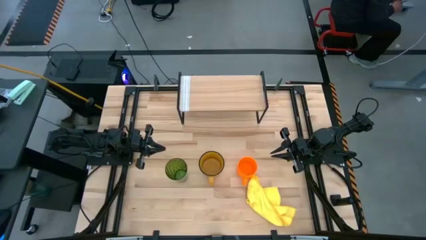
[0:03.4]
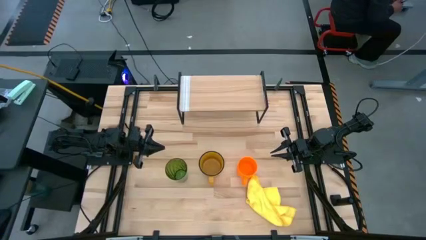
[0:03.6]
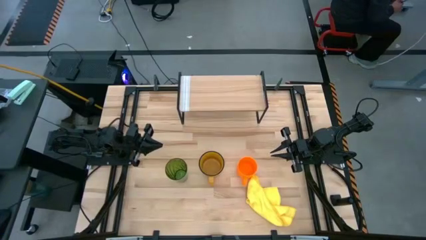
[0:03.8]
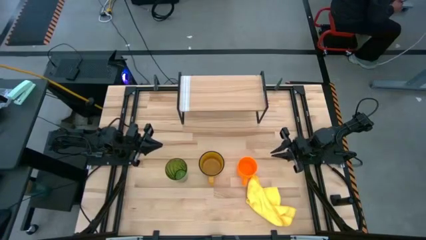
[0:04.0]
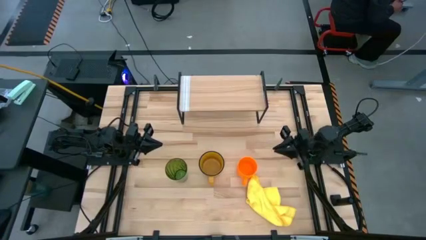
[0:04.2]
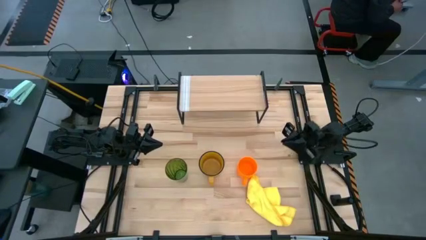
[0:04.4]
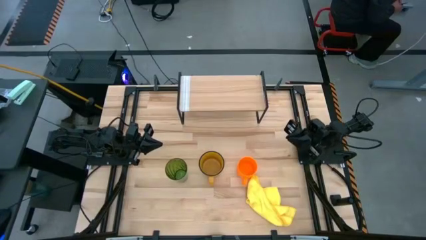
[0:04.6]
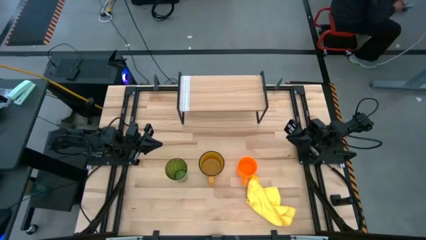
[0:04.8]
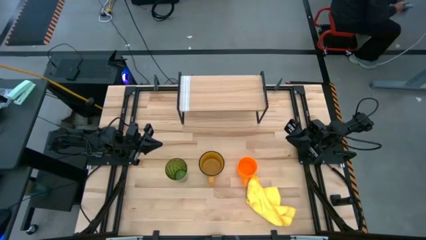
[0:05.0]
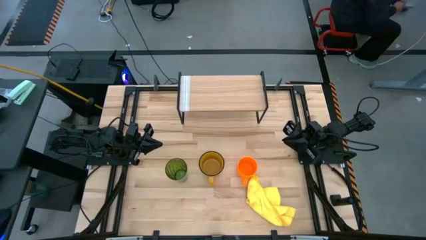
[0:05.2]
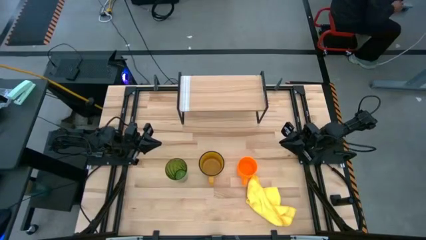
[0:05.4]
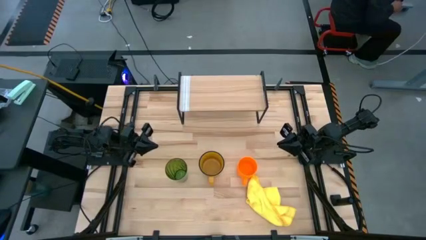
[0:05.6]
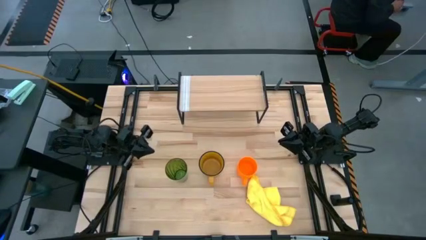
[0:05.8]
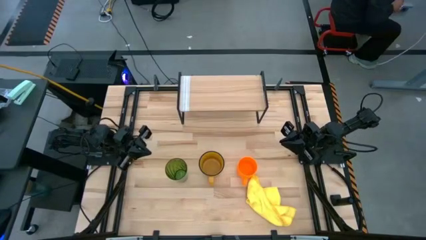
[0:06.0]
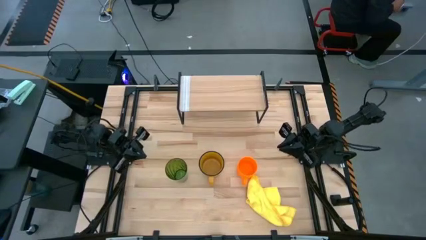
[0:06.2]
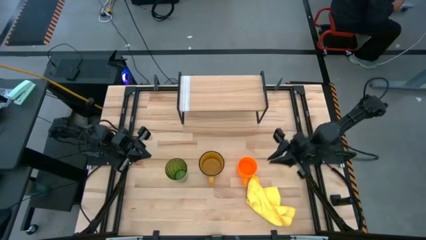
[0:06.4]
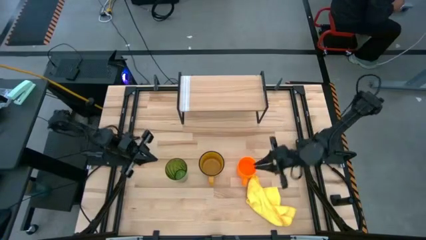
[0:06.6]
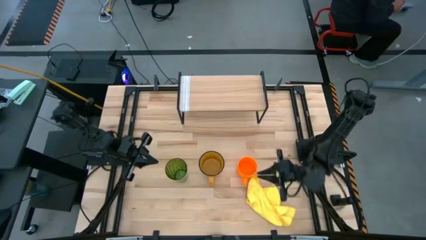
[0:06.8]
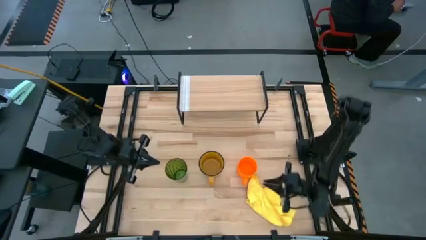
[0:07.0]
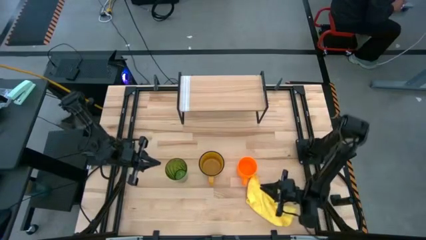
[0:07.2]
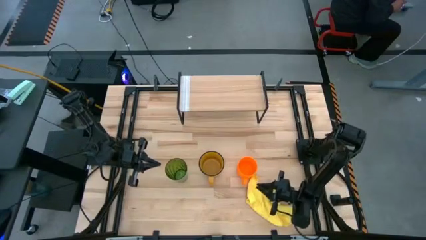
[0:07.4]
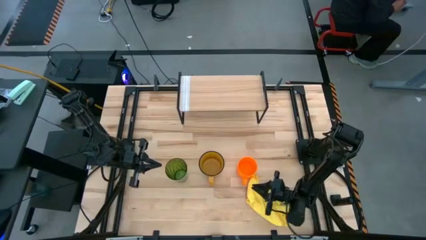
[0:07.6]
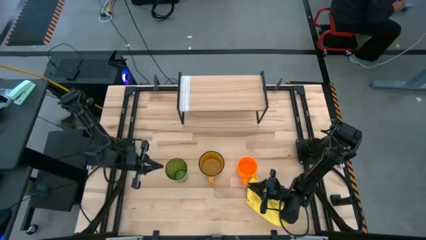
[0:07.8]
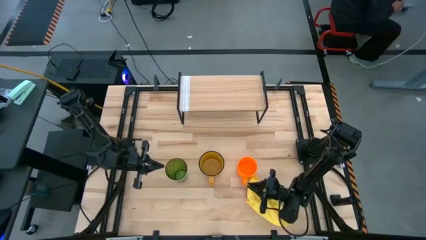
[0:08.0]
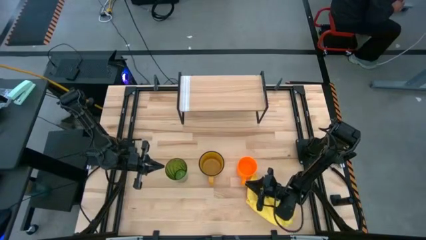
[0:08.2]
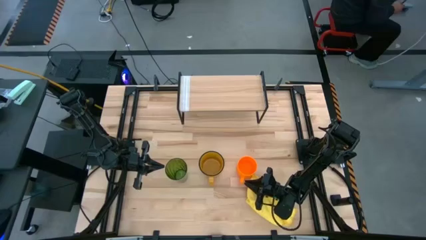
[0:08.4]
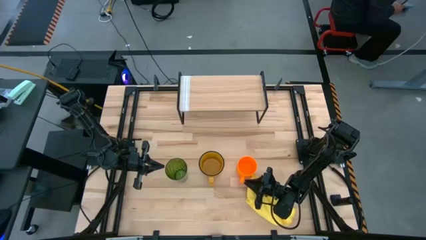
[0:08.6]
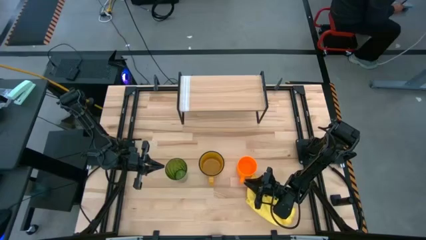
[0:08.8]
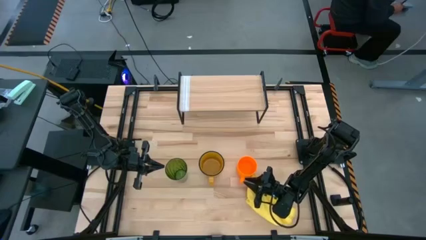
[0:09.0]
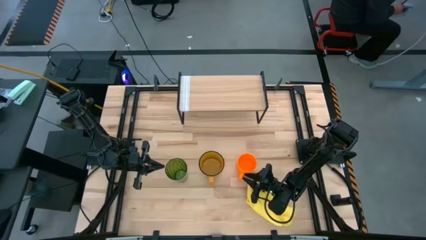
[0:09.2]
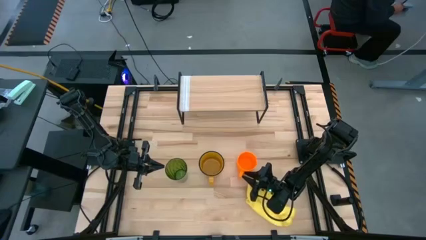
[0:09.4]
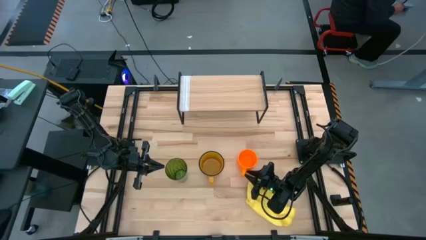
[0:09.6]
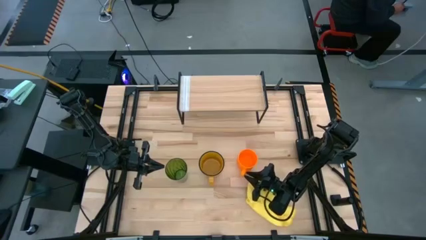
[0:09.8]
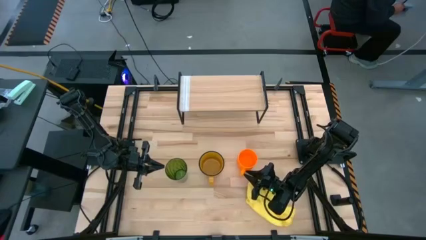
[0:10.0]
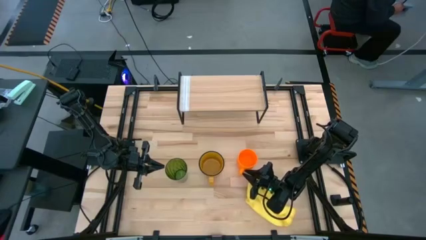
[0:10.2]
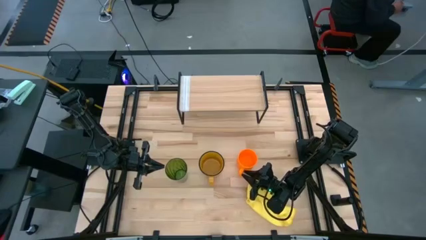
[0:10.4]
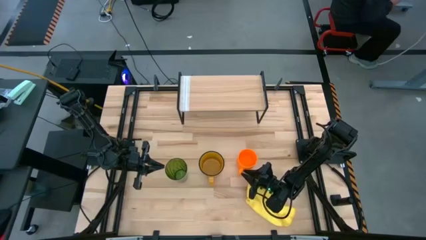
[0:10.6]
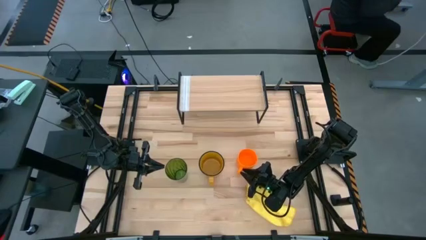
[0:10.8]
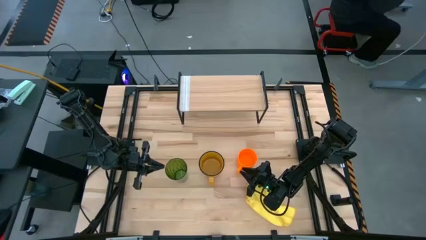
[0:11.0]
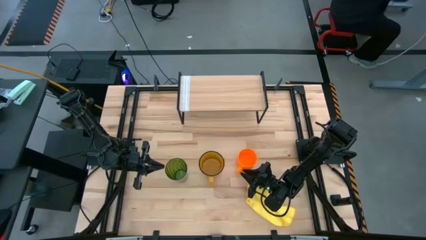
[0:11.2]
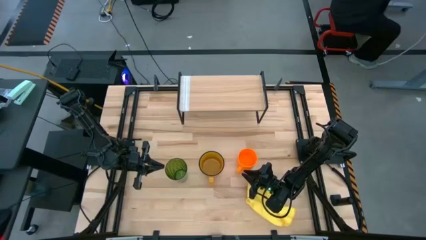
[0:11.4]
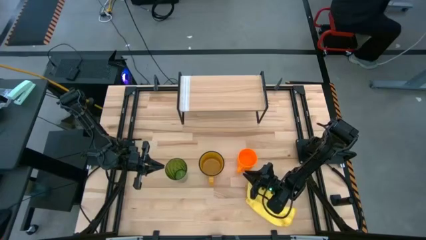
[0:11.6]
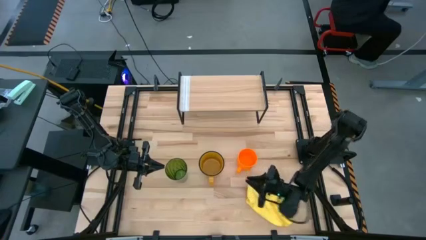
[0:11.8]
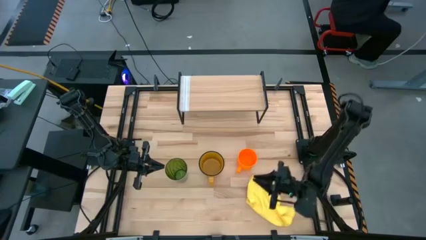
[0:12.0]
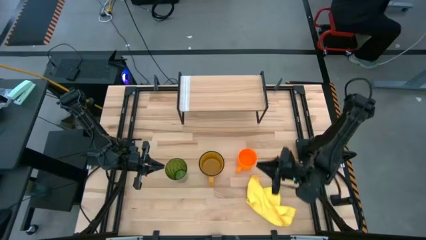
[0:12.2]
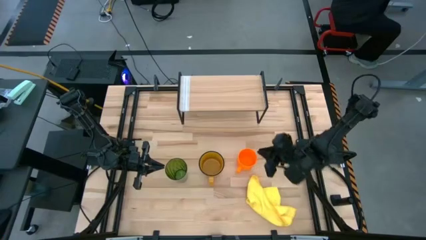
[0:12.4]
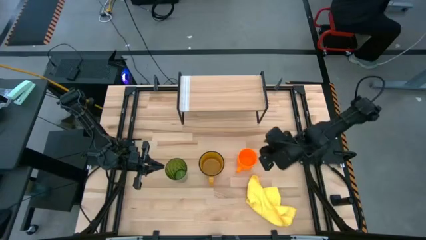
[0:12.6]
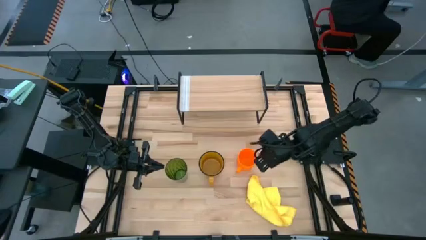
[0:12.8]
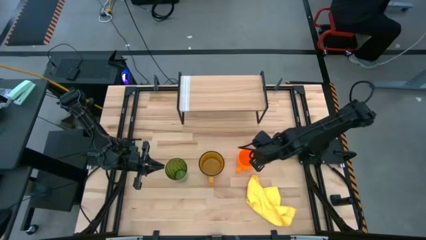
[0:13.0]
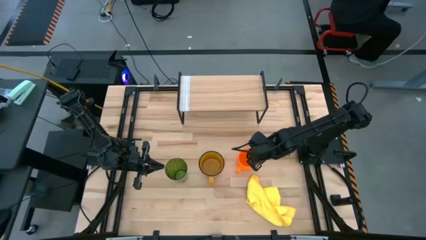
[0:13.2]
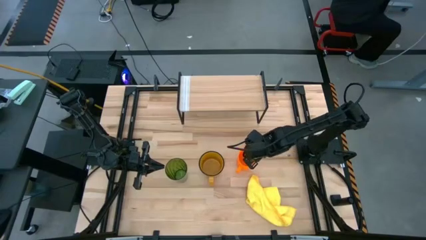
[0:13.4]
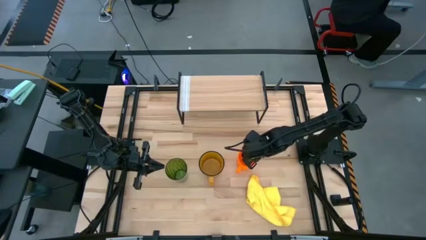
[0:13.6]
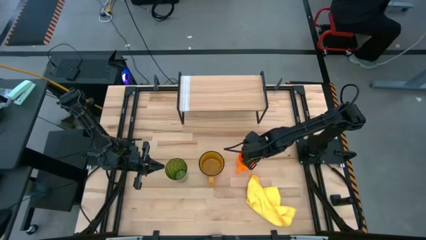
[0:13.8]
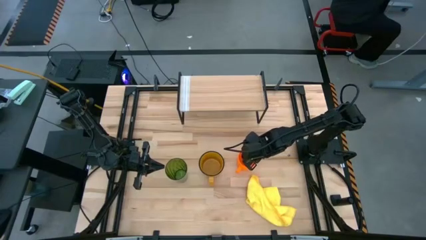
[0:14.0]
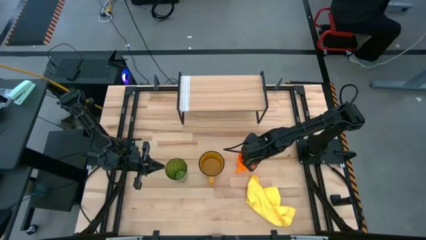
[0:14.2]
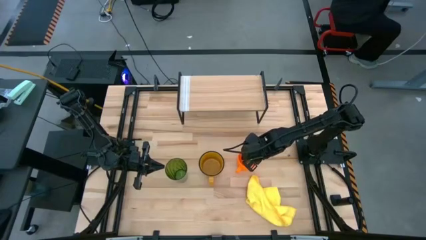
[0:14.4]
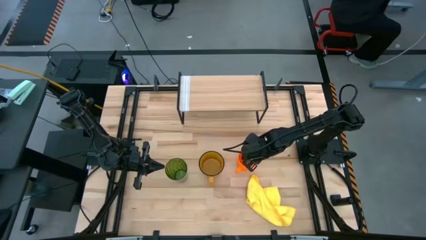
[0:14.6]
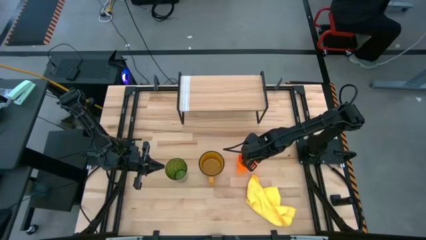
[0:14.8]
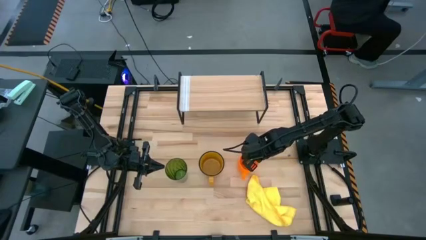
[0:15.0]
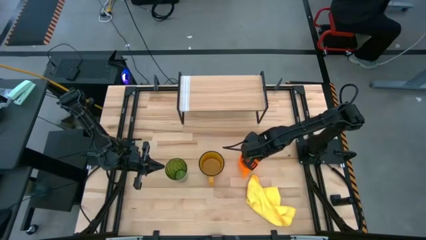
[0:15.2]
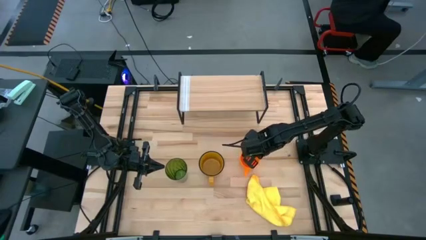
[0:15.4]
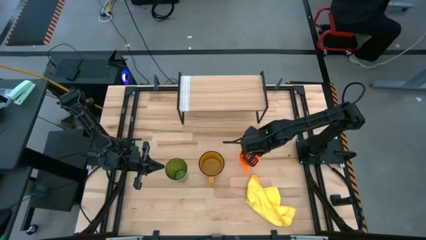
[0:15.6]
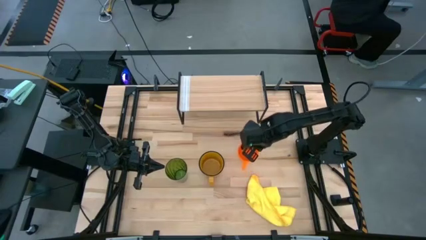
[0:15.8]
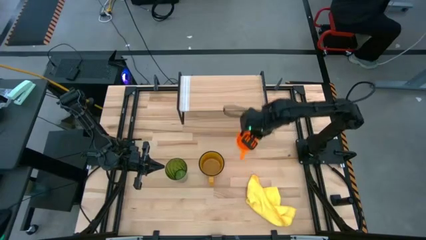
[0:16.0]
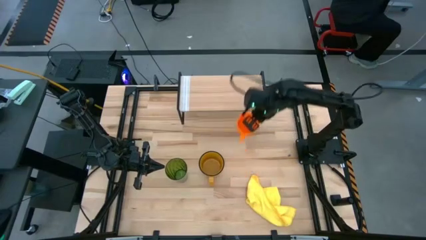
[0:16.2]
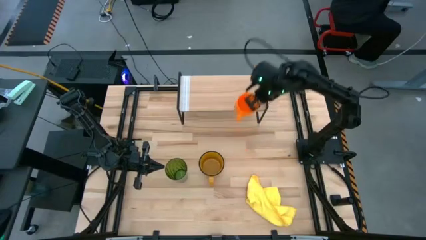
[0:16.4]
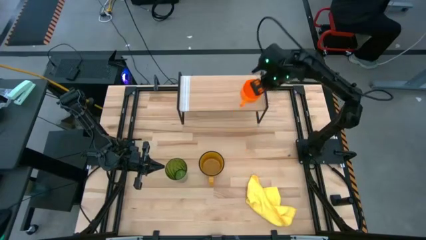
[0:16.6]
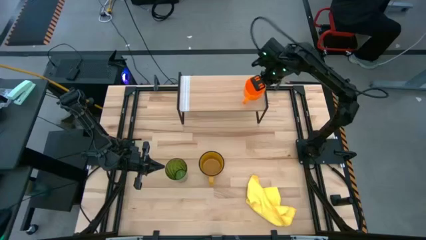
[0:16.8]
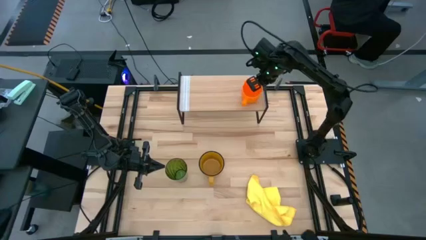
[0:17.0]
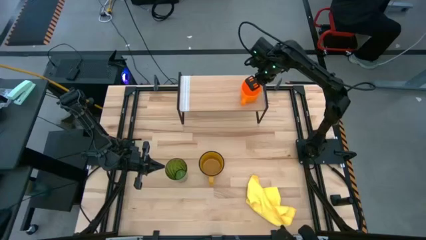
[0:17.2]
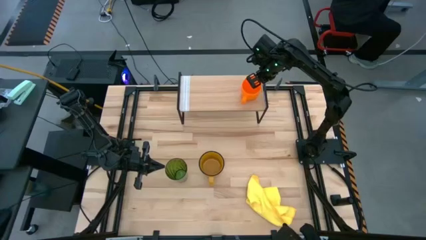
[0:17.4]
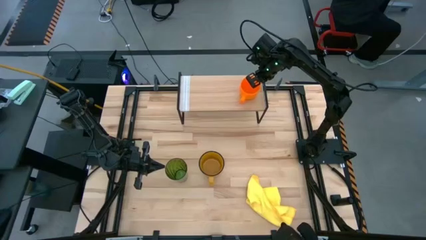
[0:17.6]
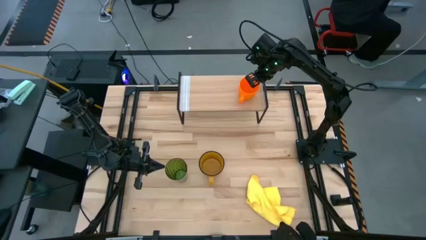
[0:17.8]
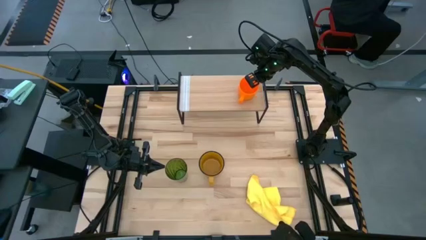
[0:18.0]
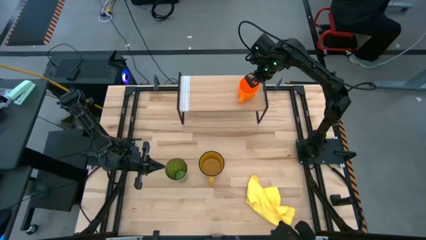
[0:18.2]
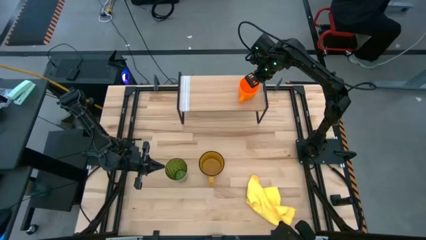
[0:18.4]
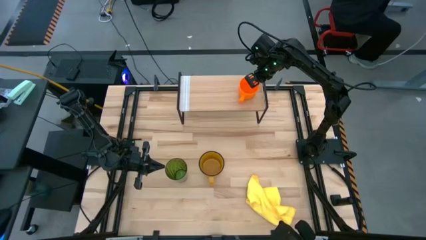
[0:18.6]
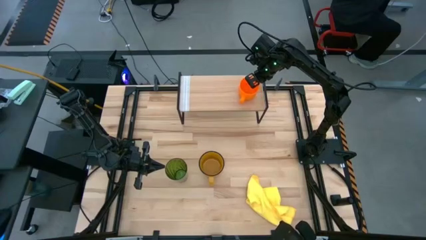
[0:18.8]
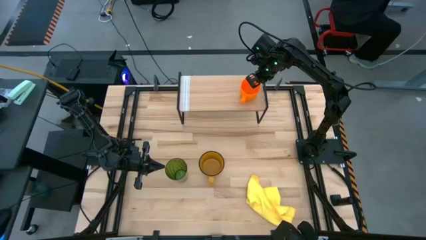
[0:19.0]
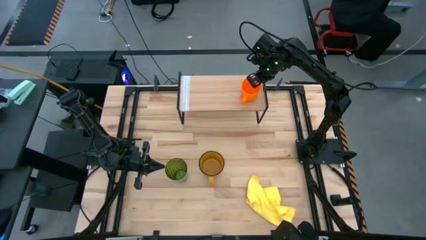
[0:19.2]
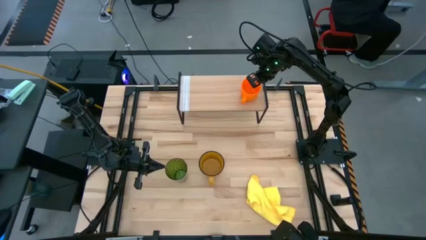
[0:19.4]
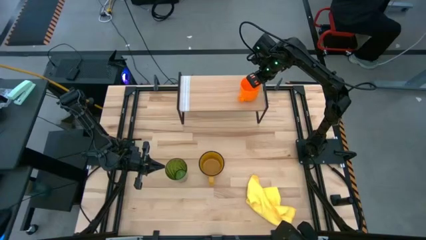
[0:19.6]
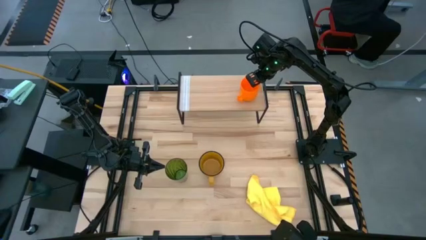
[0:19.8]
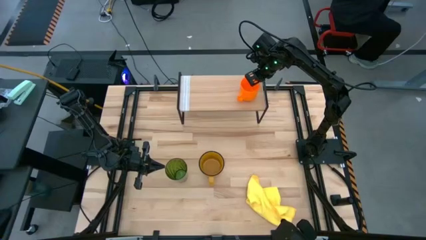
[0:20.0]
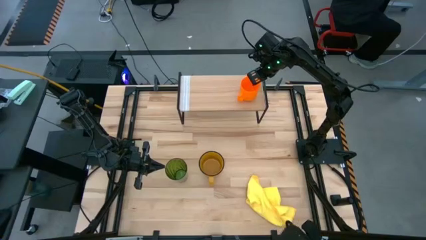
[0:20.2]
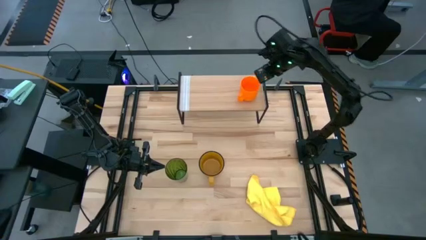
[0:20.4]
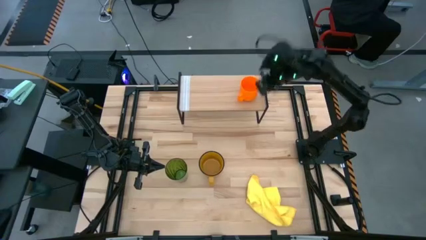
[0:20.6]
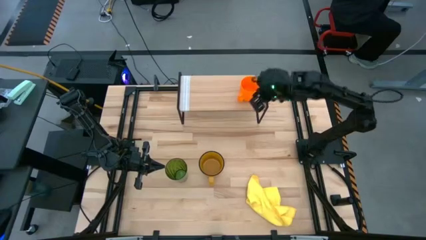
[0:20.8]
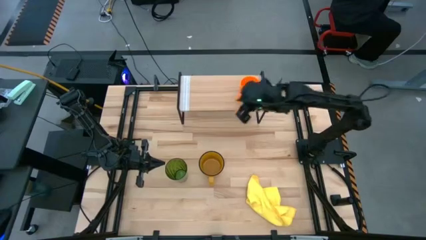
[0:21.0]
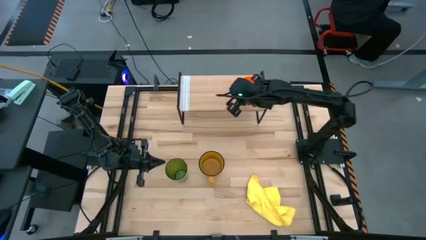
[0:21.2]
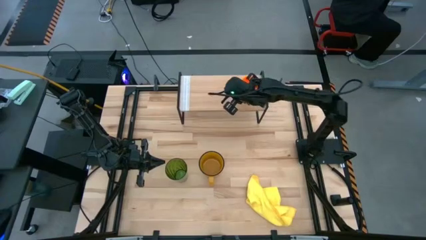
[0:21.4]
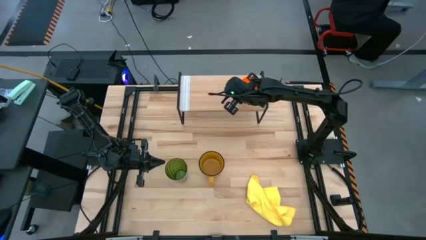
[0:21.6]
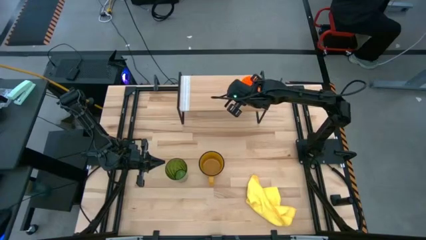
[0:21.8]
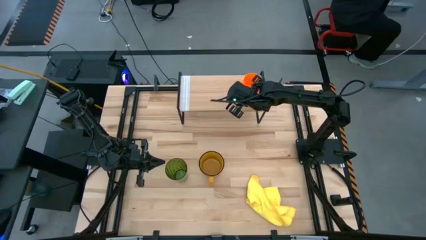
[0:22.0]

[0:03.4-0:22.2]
Task: Stack small to large cups/mugs on shelf
Put the orange mug on the shelf
